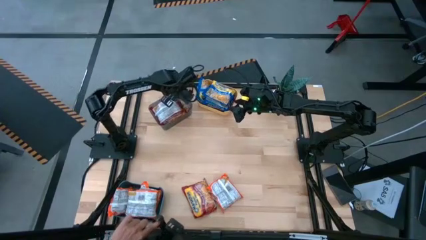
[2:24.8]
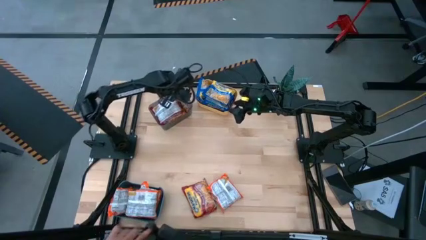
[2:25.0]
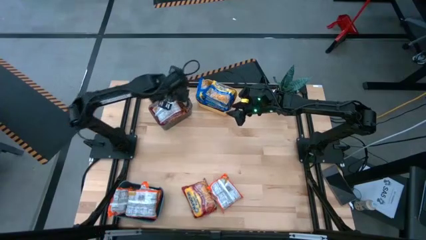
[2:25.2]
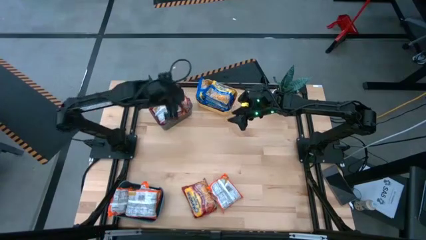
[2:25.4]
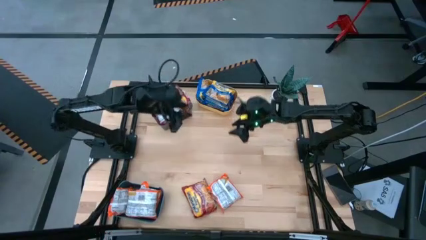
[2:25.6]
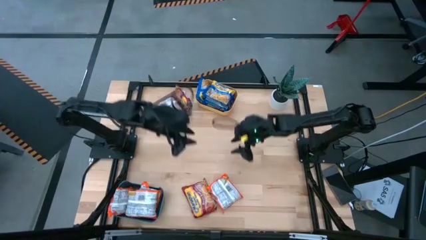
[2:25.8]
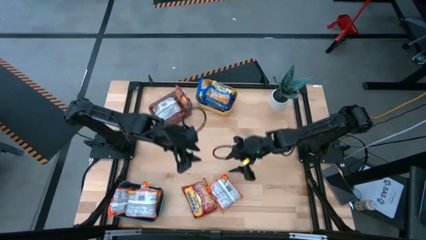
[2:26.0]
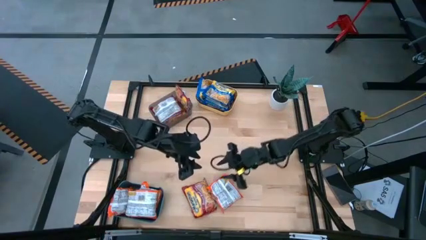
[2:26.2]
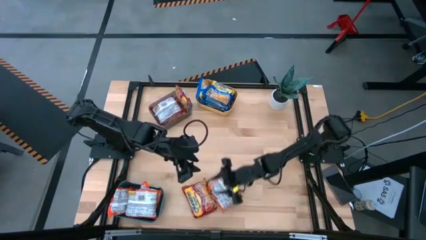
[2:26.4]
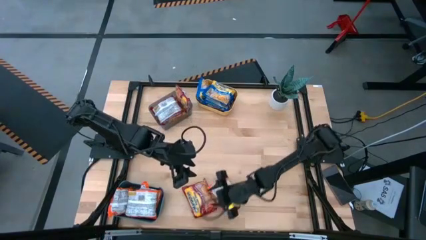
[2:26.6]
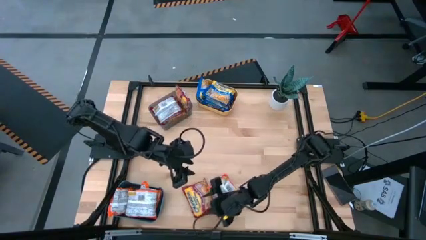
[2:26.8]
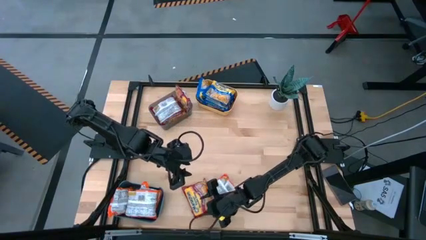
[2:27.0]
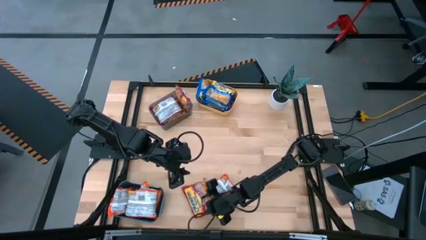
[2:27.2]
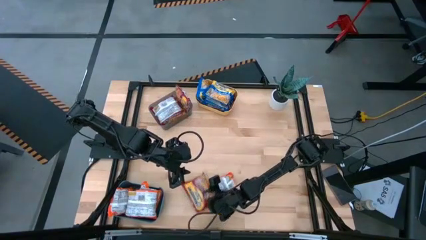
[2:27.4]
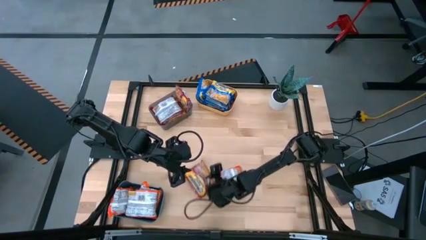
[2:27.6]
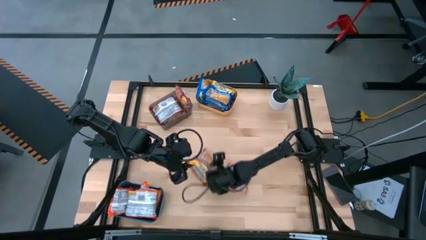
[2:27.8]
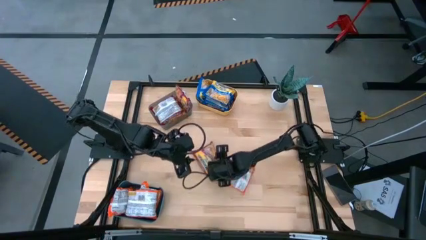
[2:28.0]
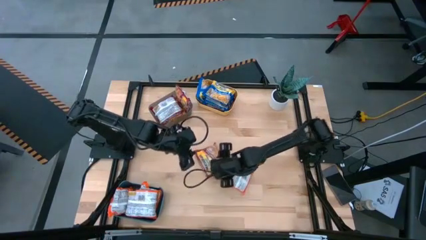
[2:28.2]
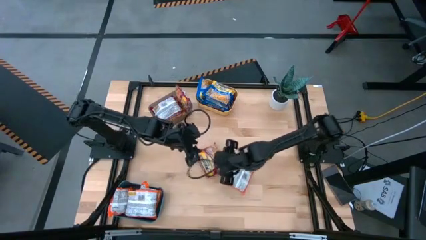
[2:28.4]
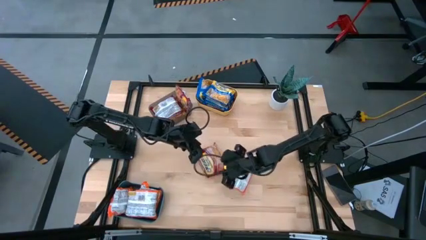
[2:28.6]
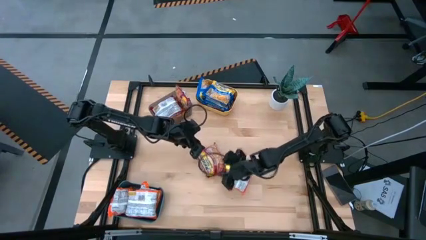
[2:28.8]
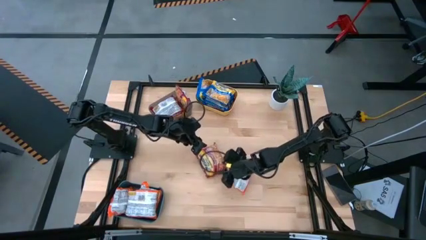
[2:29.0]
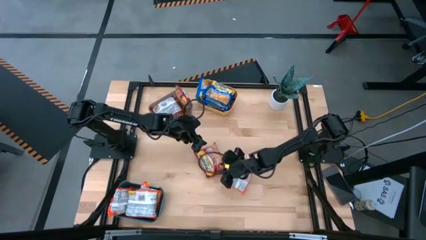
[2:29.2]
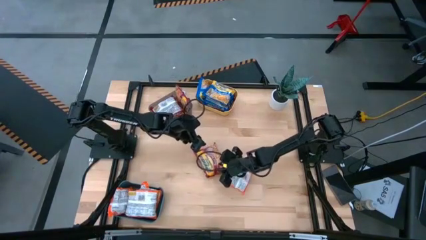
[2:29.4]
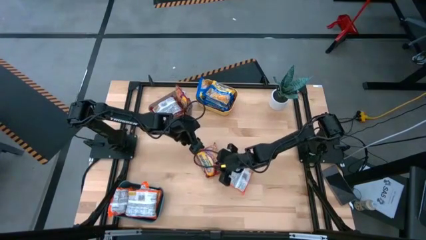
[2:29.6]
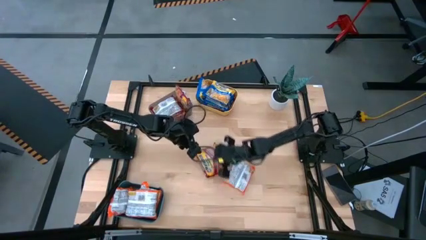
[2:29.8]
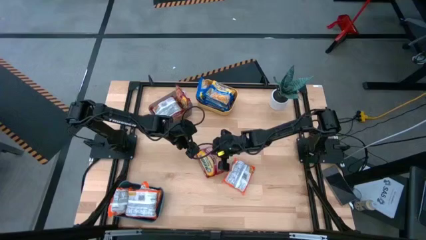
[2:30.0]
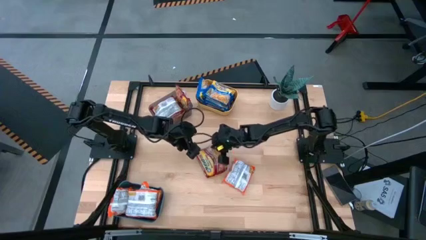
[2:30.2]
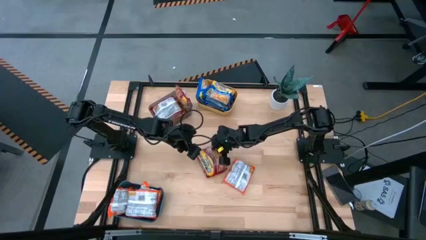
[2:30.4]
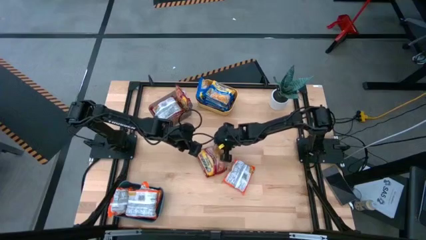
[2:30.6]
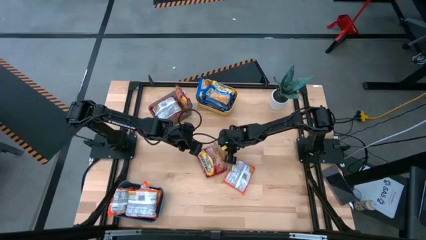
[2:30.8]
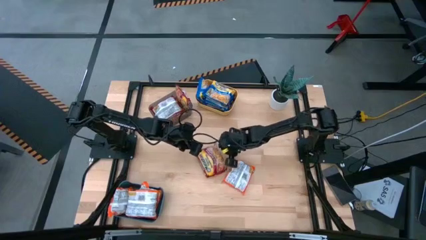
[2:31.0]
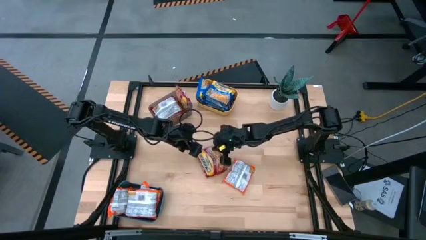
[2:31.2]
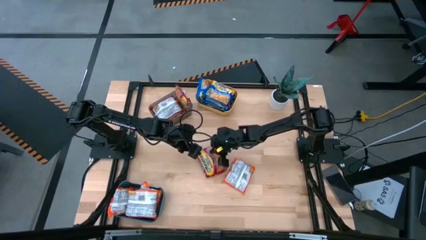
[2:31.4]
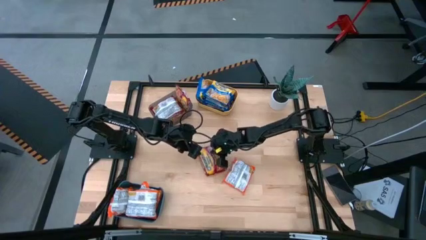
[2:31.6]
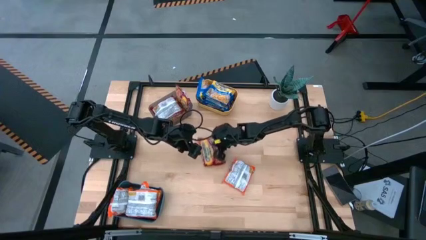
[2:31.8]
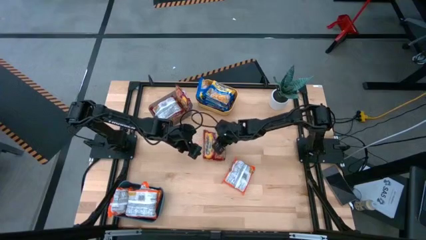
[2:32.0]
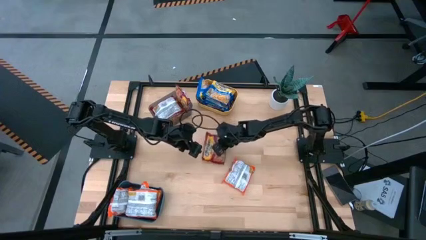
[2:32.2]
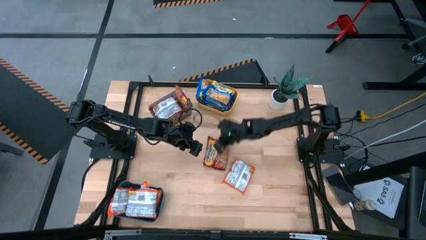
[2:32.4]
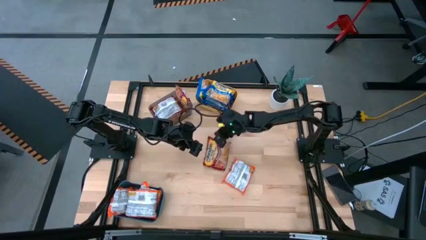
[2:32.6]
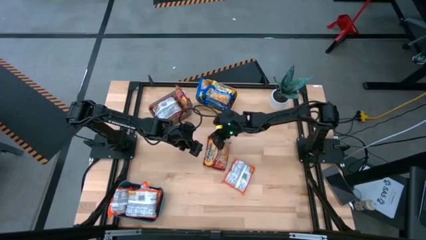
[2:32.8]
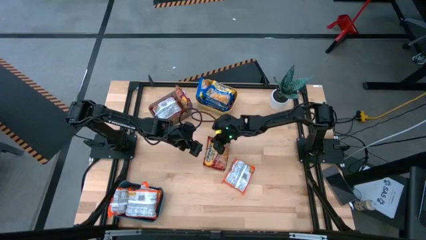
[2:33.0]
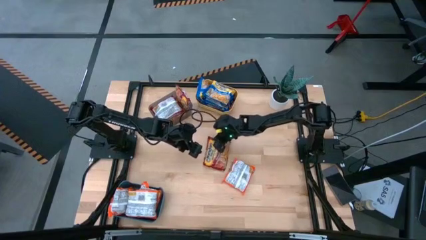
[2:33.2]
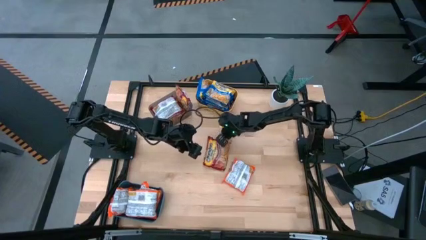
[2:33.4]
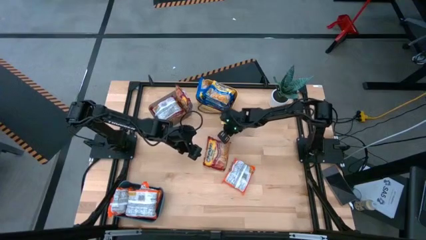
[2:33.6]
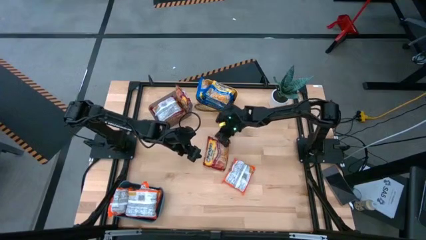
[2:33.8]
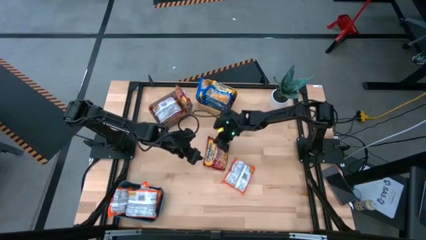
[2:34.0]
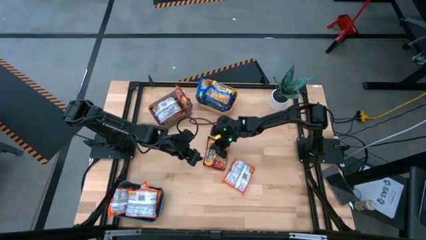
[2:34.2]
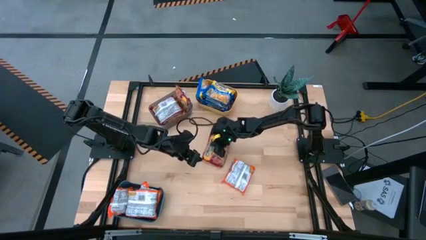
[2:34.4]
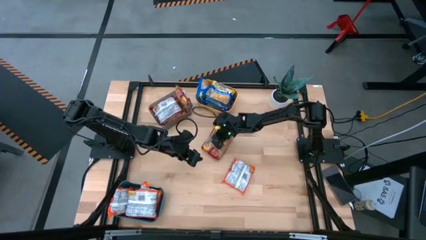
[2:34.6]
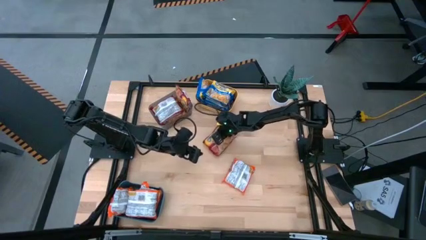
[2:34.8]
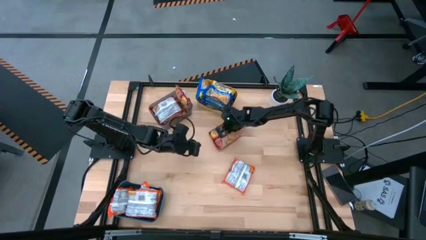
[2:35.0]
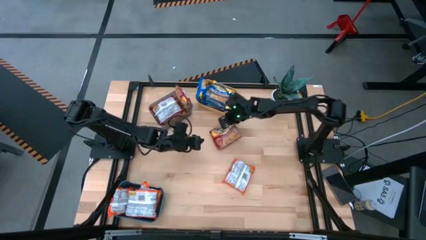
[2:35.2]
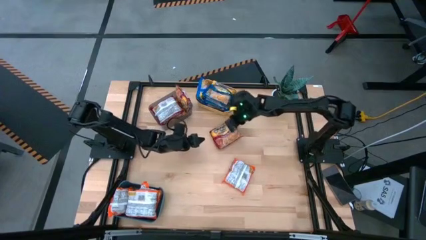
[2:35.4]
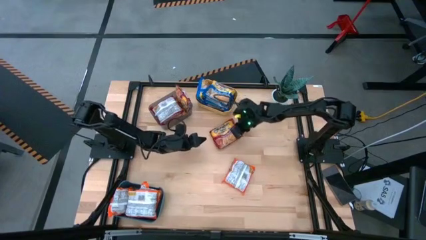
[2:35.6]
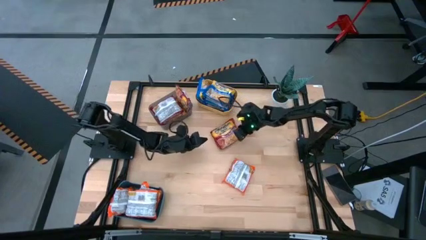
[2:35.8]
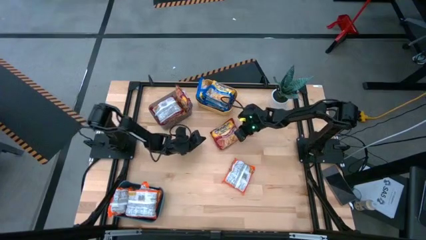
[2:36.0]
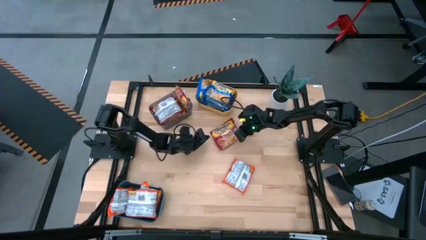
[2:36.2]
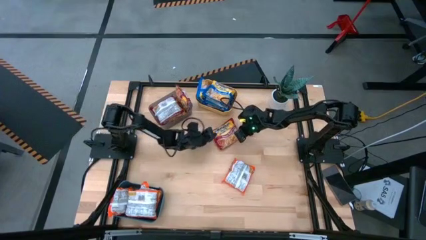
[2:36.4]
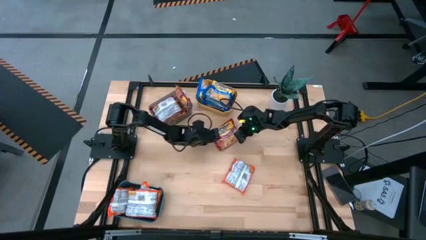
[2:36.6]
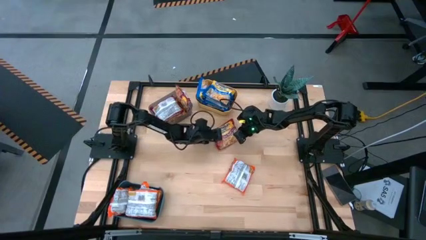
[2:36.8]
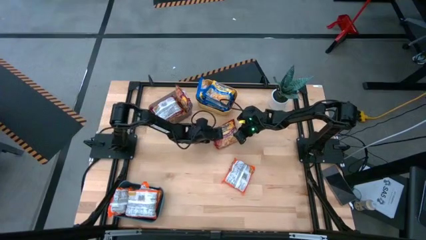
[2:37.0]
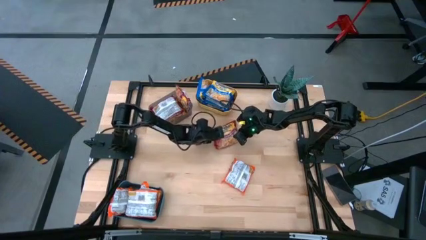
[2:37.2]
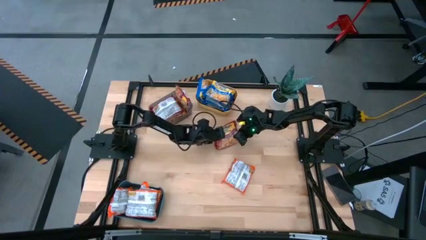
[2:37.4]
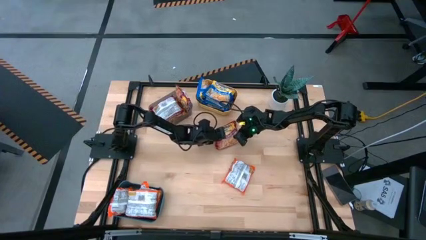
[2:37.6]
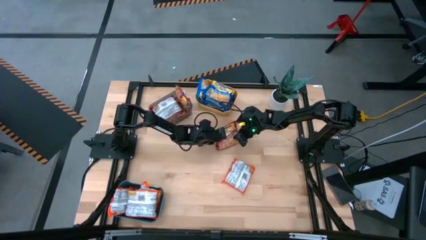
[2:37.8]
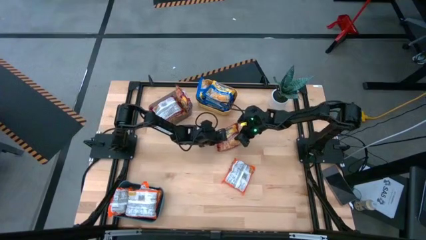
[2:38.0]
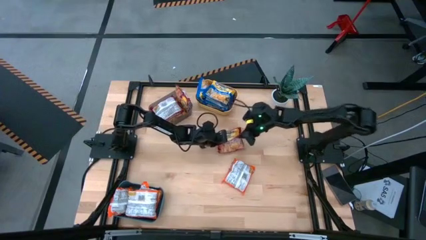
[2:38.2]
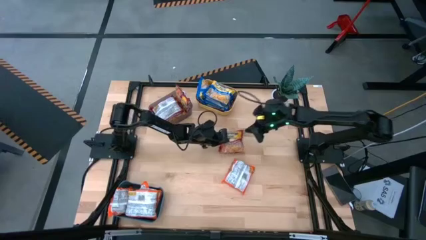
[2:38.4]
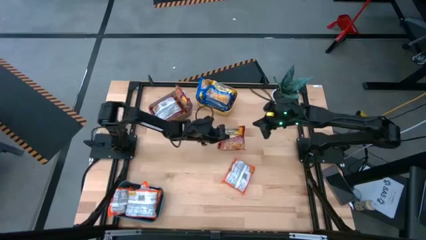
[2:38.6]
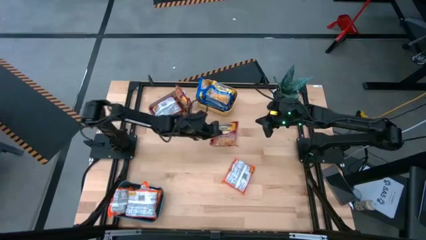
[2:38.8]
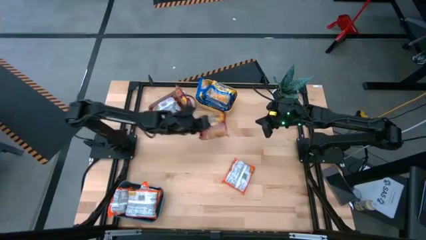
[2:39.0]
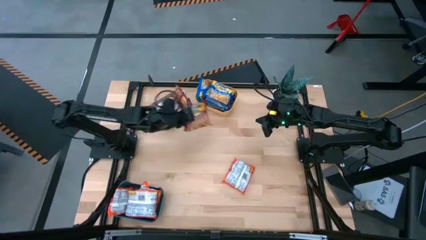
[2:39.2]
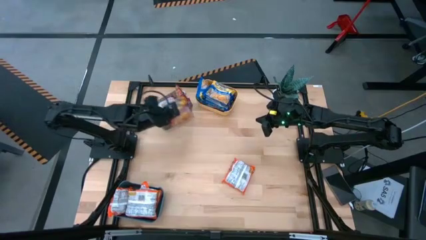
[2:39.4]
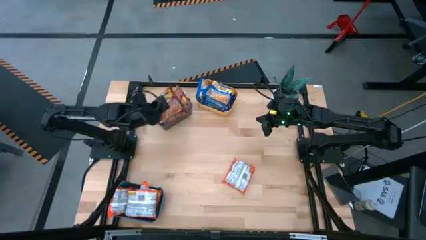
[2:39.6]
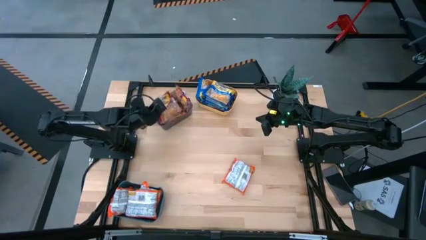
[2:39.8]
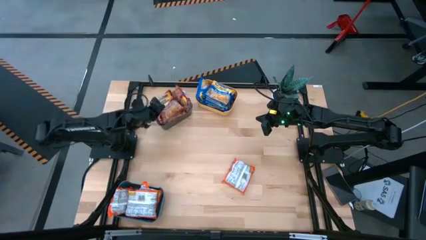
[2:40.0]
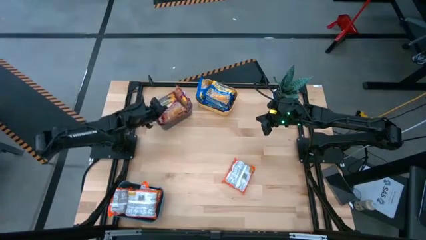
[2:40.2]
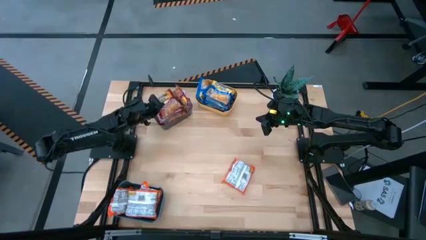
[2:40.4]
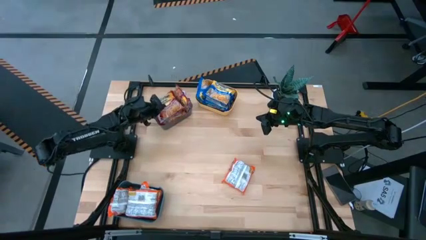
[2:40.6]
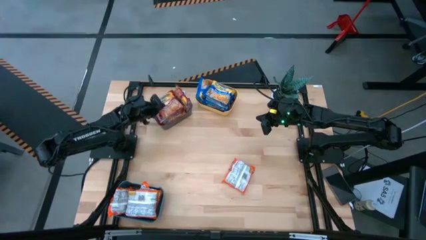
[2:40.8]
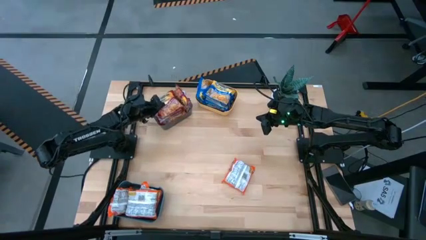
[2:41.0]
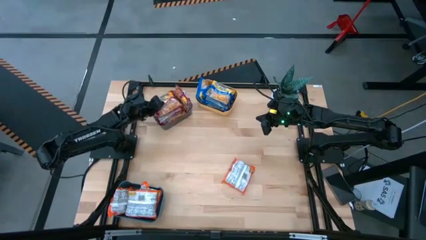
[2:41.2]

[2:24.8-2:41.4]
Task: Sort Maruchan noodles
Put the red noodle pack into the gray bin
